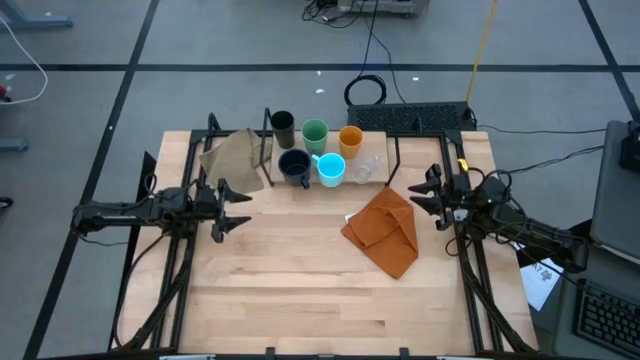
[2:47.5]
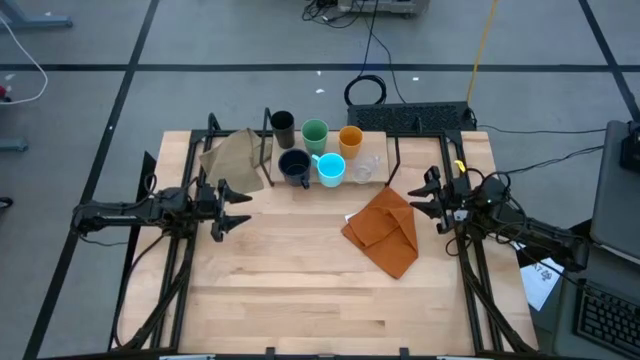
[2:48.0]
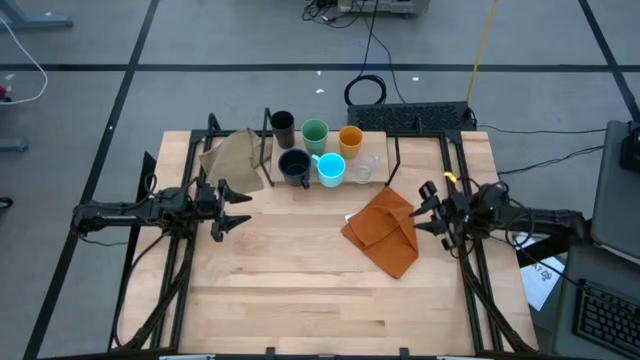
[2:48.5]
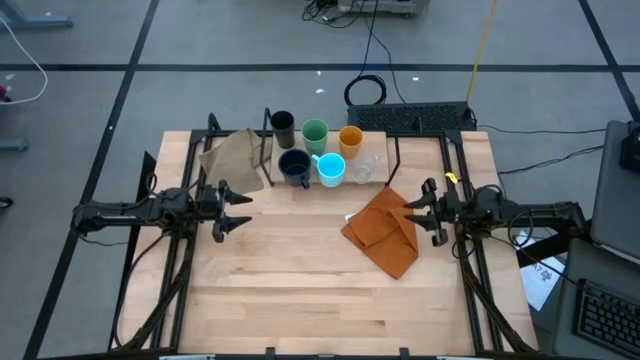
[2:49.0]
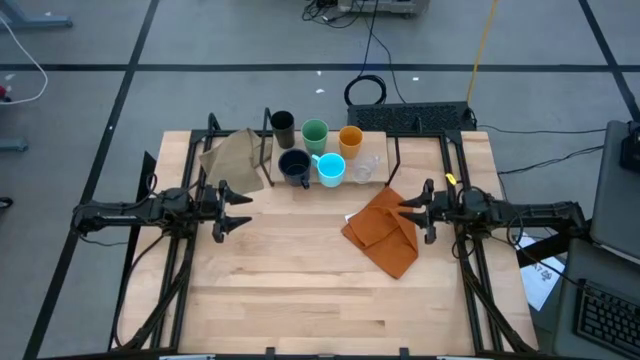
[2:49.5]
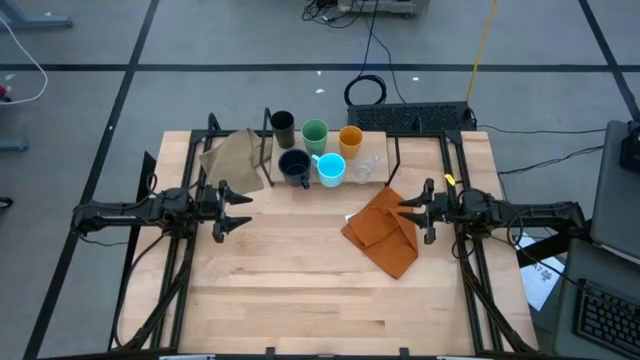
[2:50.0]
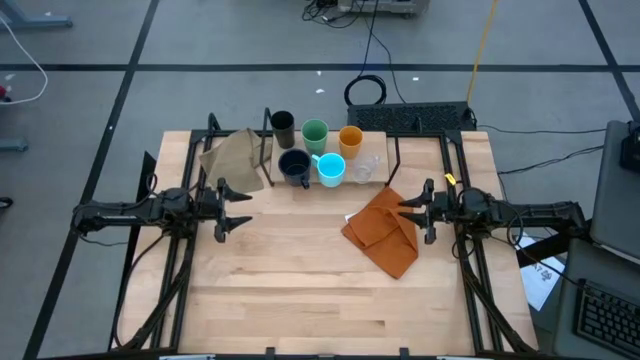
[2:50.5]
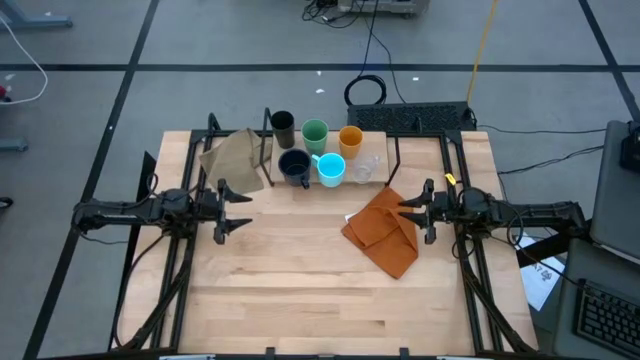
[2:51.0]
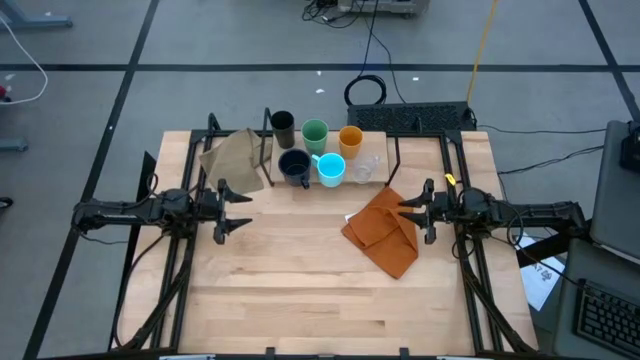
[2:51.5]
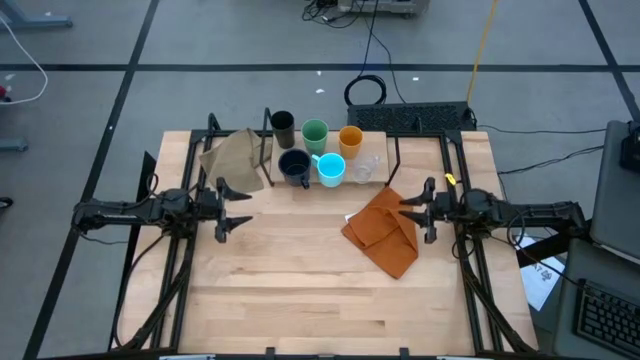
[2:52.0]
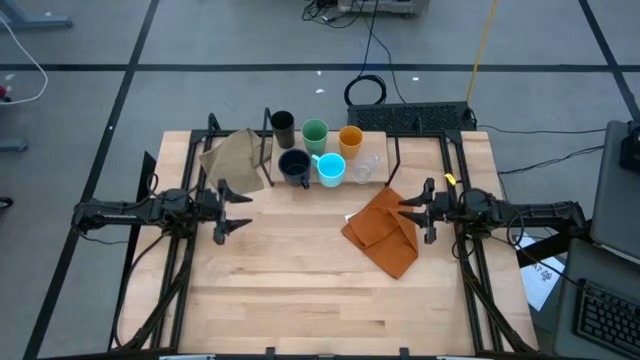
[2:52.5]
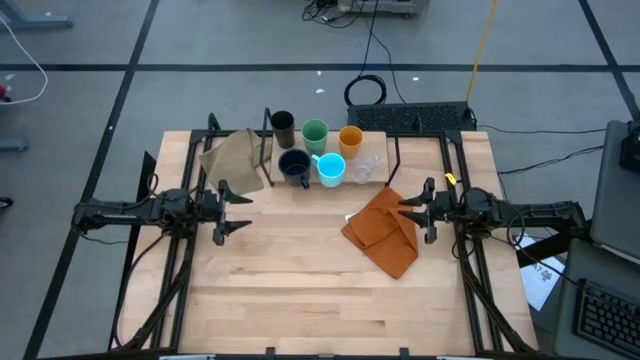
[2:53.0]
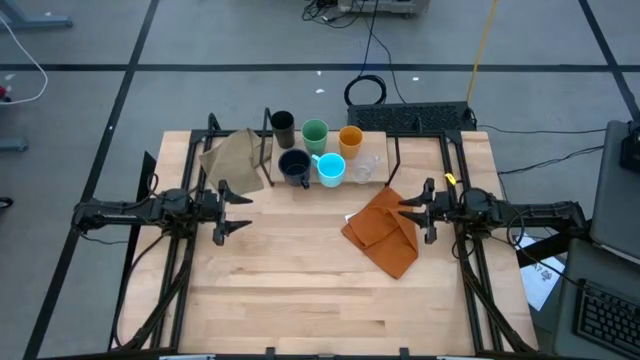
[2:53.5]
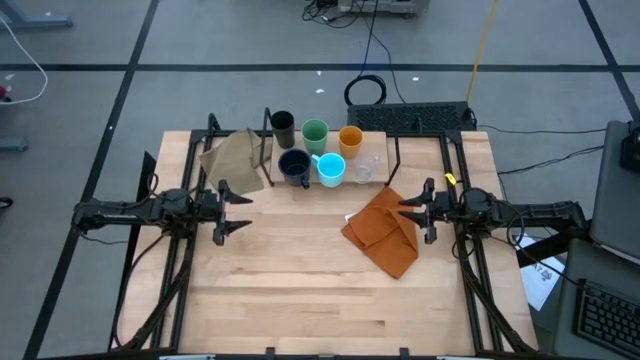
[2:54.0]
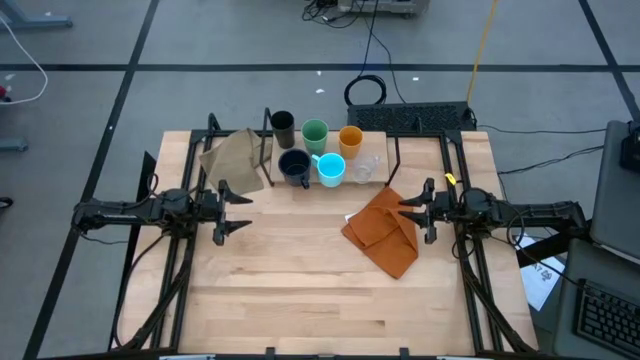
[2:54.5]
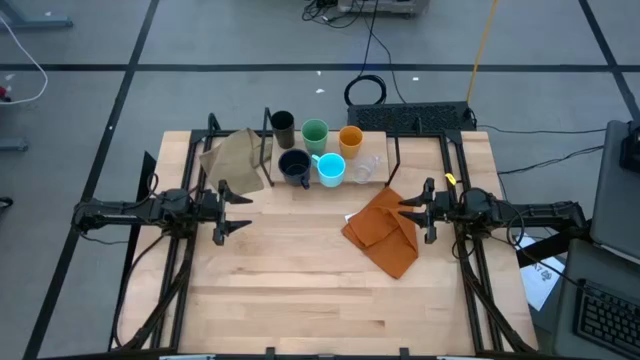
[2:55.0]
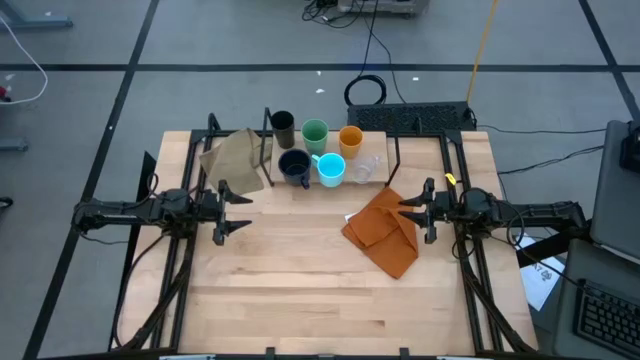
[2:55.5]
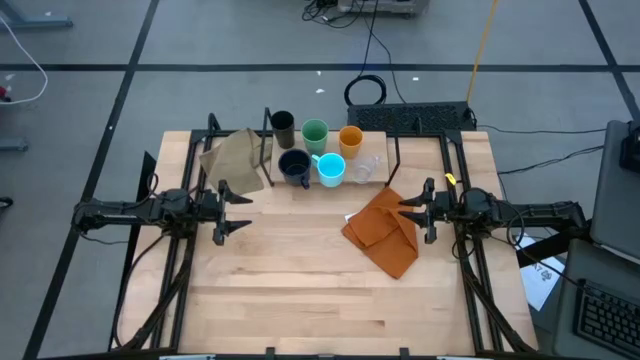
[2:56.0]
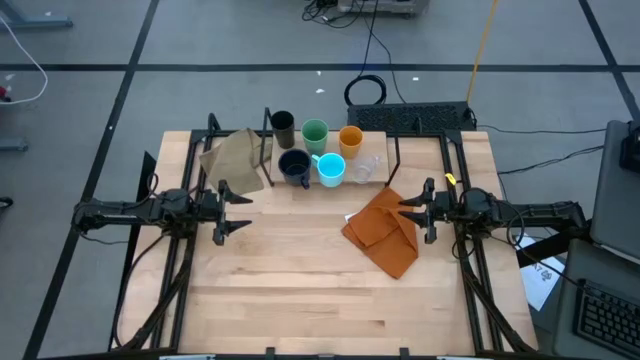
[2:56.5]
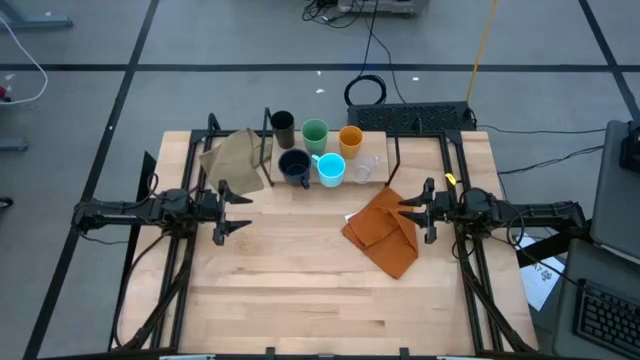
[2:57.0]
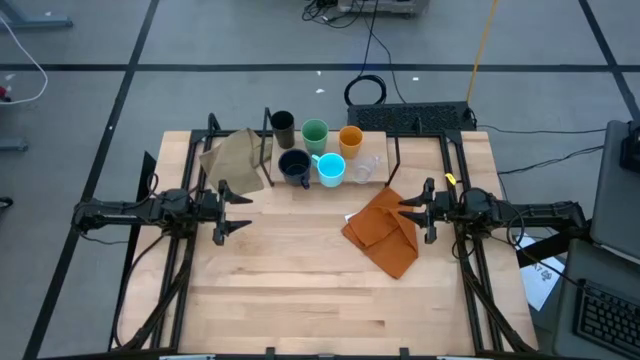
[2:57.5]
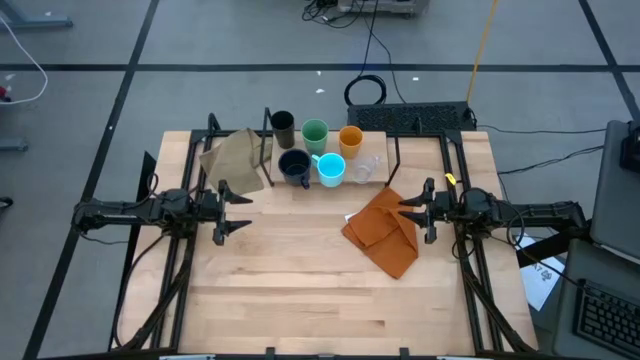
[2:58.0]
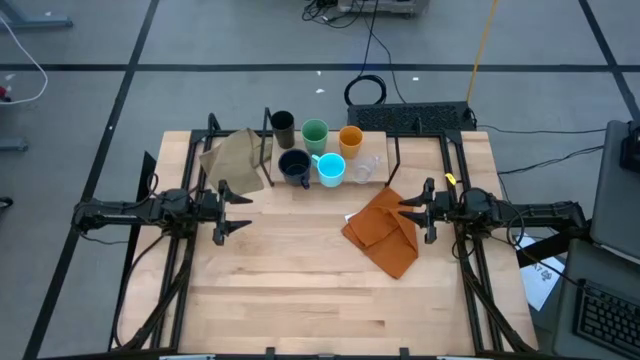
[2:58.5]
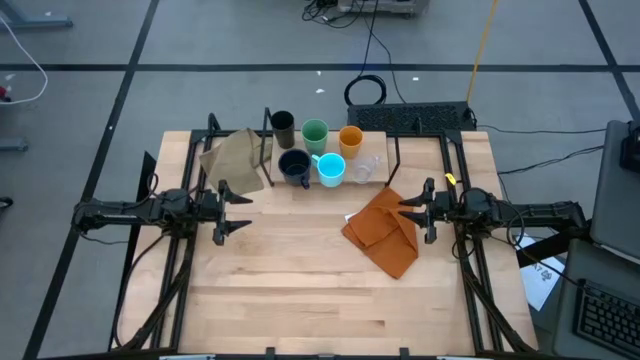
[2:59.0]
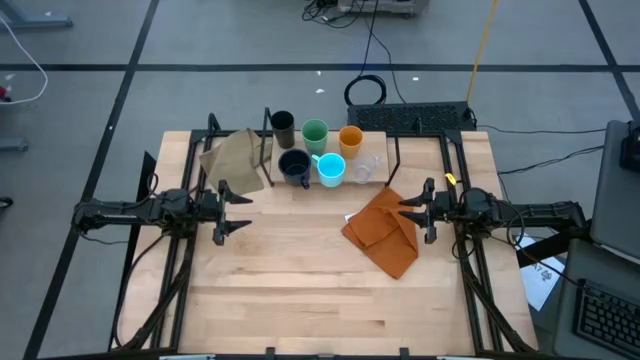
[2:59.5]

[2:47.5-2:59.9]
Task: Stack small to large cups/mugs on shelf
Return to Home Position

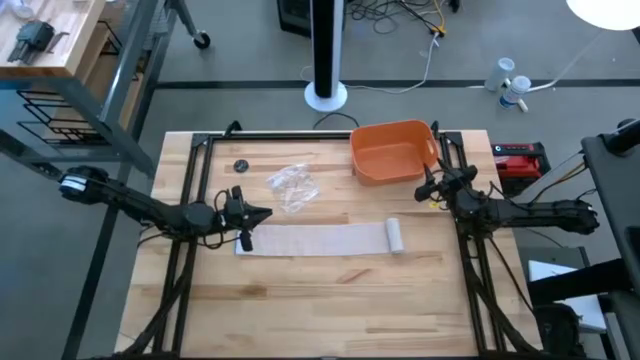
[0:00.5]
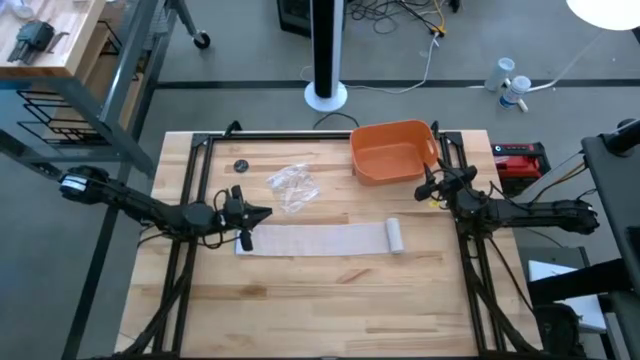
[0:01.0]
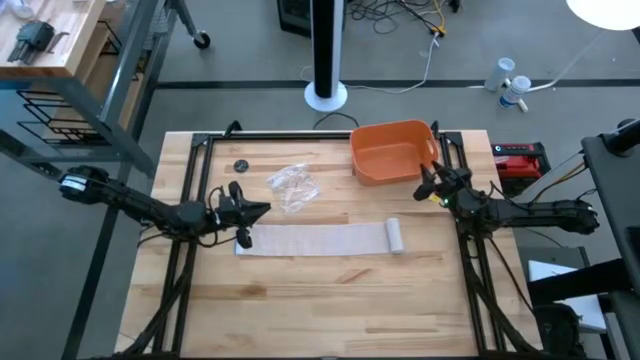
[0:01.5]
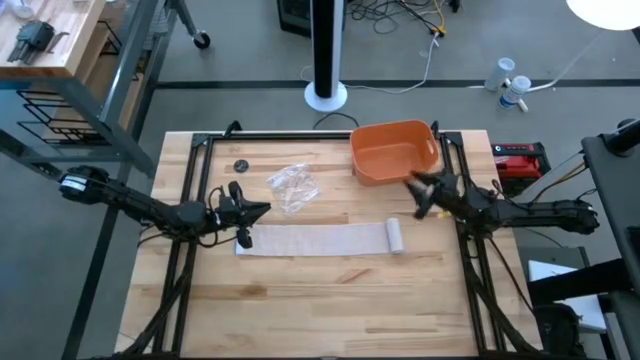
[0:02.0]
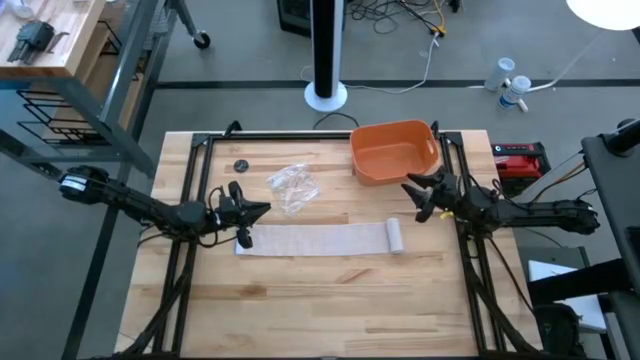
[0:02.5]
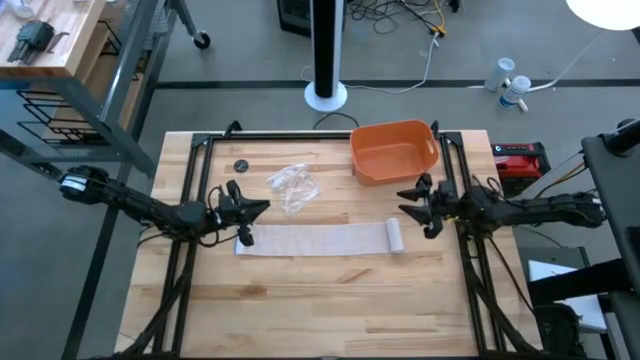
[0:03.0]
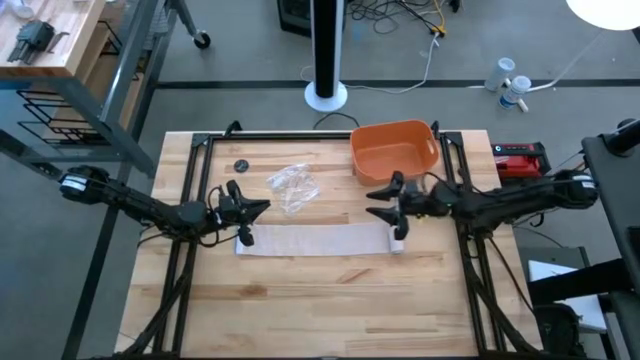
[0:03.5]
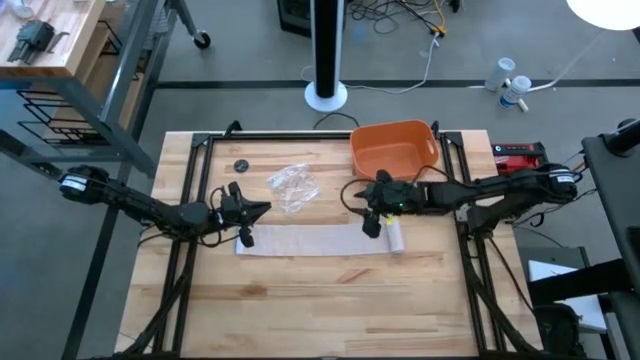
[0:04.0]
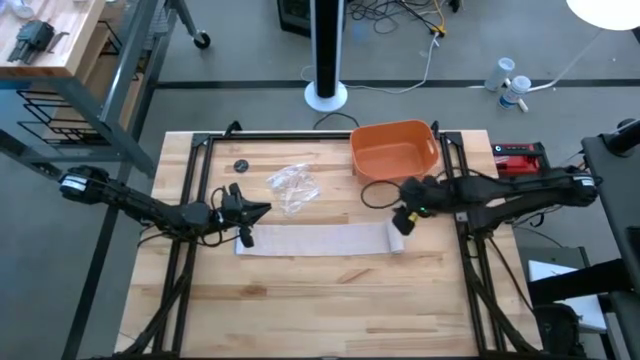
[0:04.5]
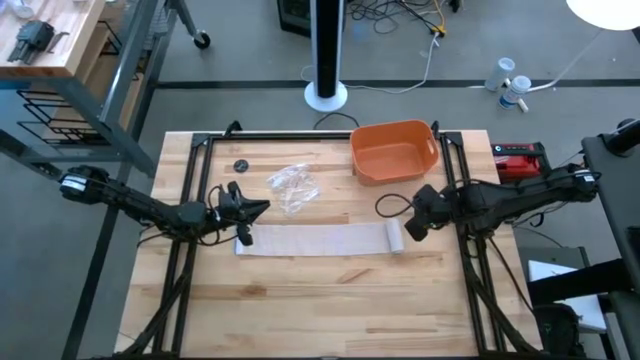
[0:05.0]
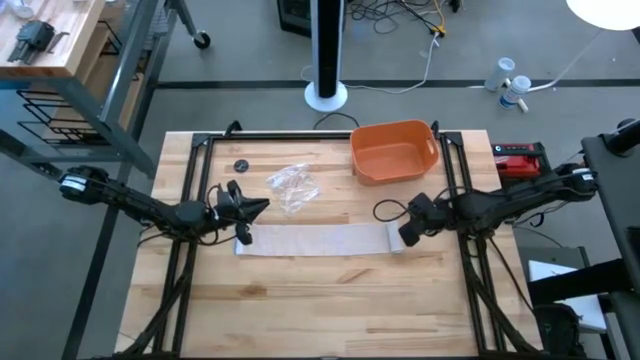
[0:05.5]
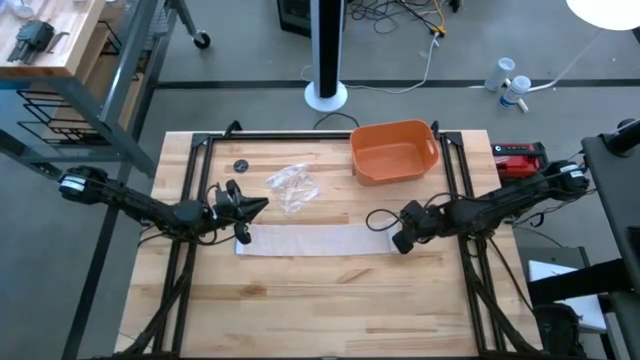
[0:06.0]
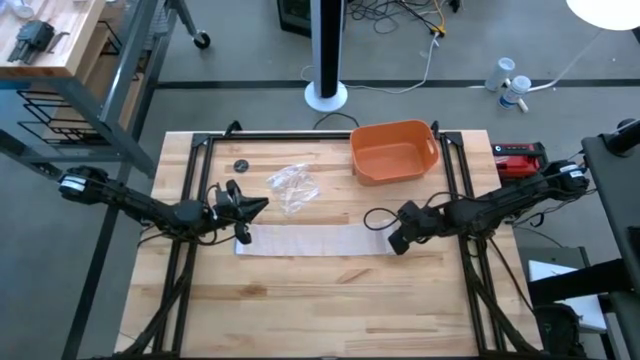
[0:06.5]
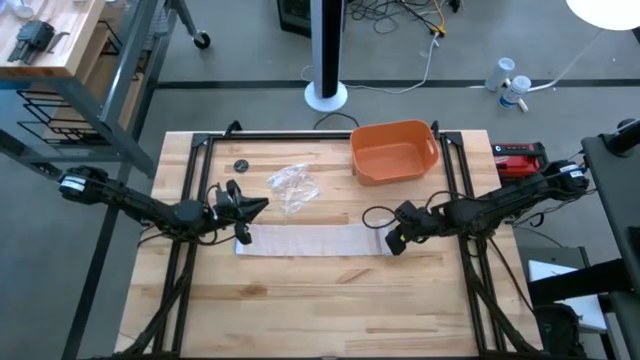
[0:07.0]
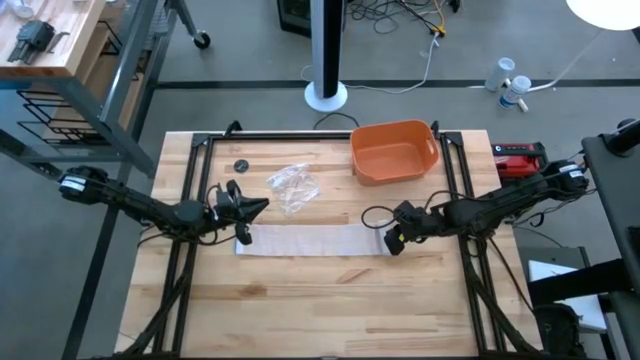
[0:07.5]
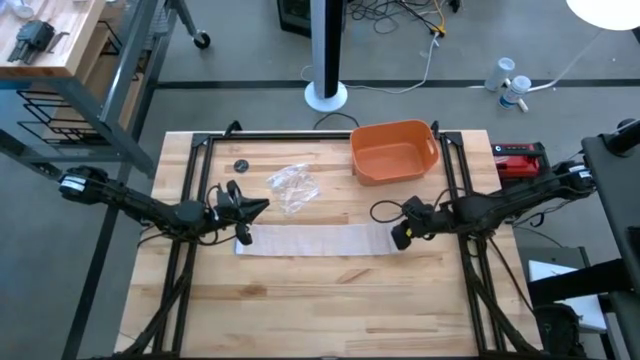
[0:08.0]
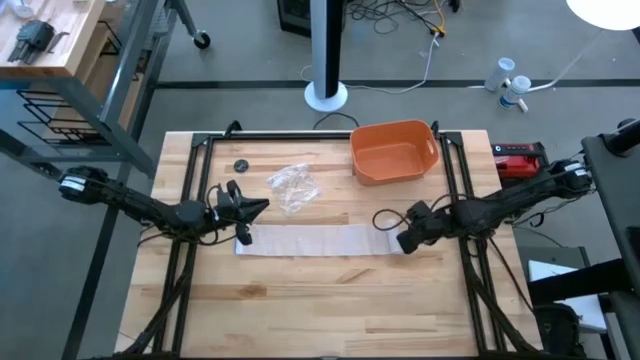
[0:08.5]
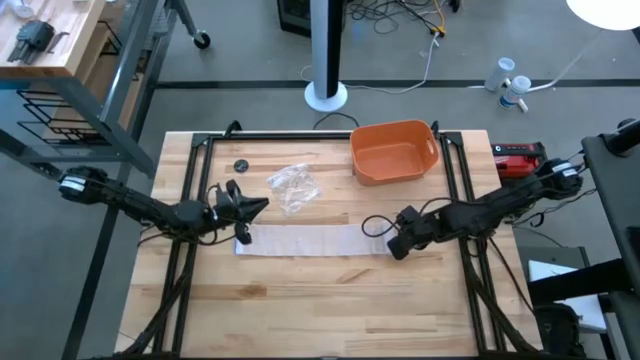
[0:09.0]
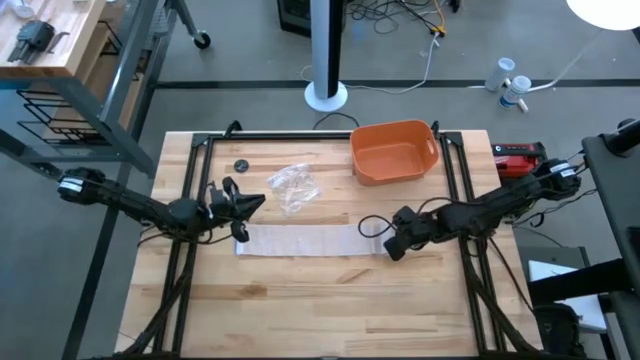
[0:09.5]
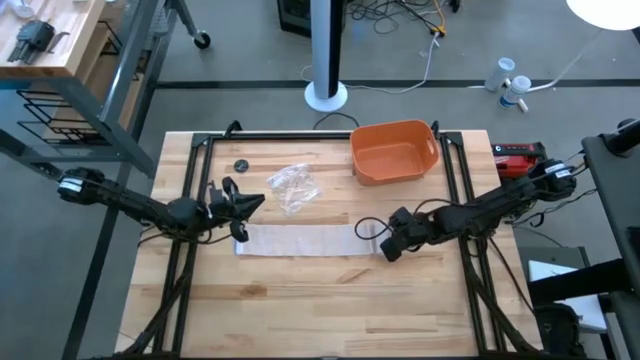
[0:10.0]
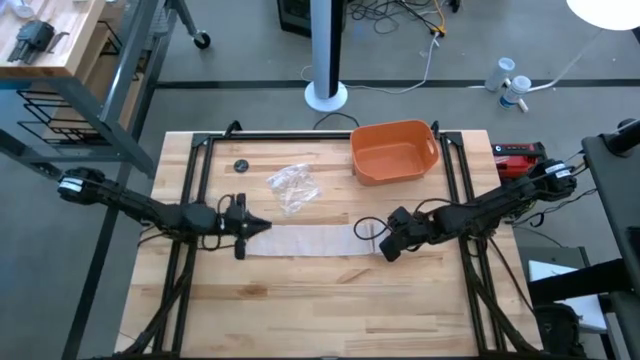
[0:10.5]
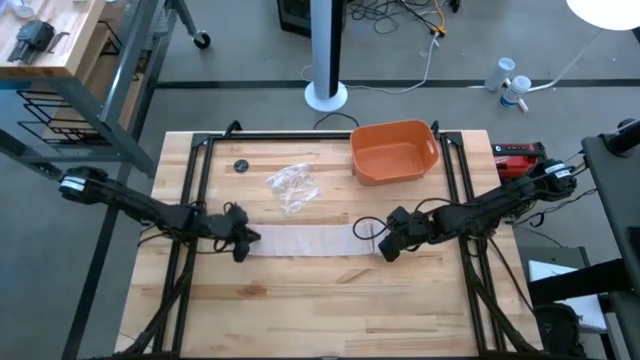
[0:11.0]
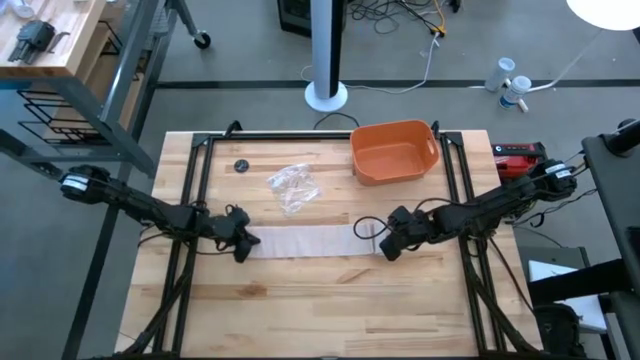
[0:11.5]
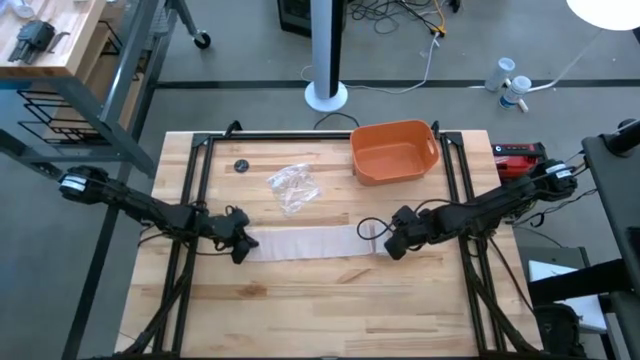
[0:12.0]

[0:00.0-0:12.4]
Task: Roll bandage
Roll the brown bandage
